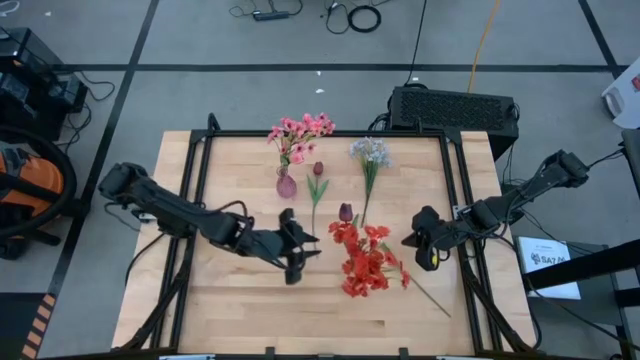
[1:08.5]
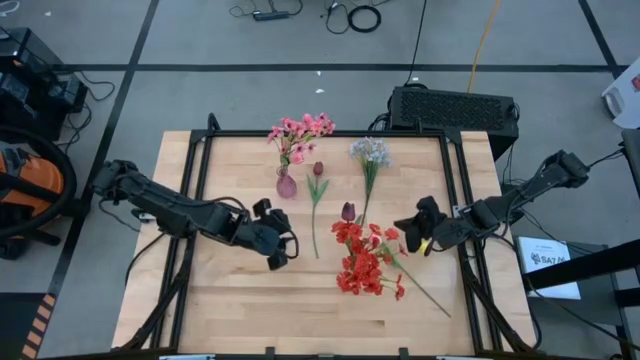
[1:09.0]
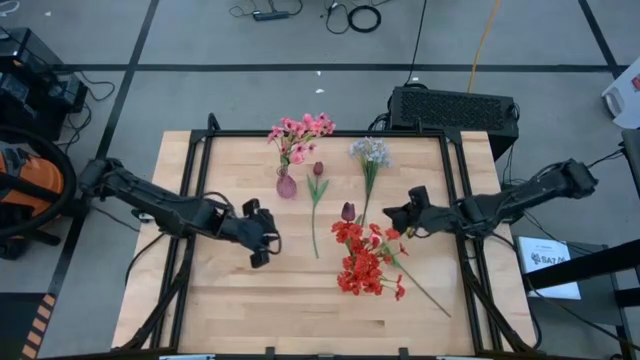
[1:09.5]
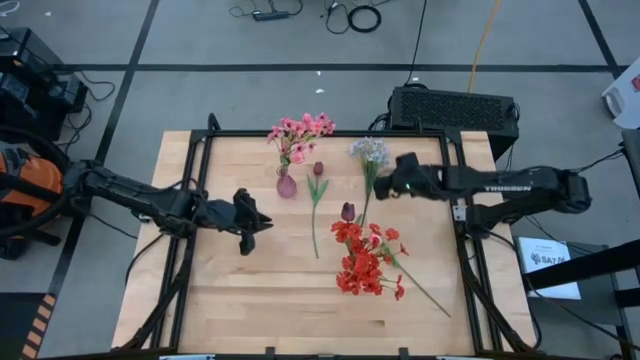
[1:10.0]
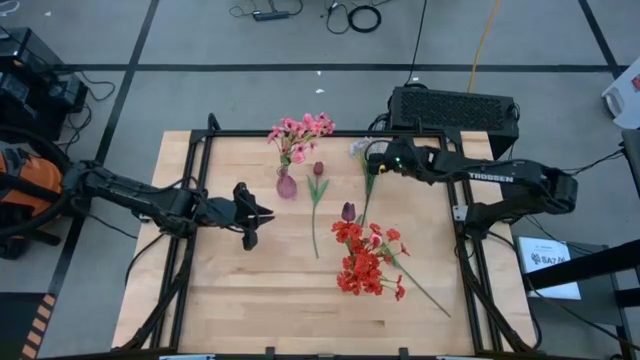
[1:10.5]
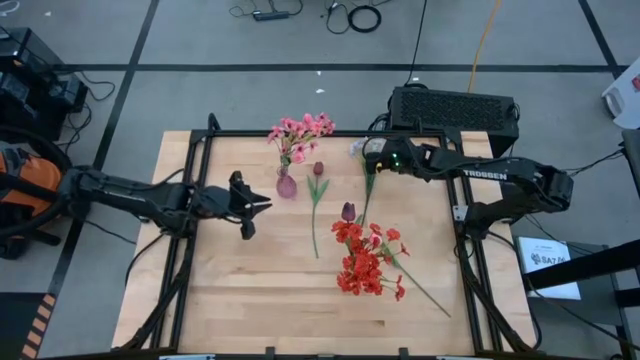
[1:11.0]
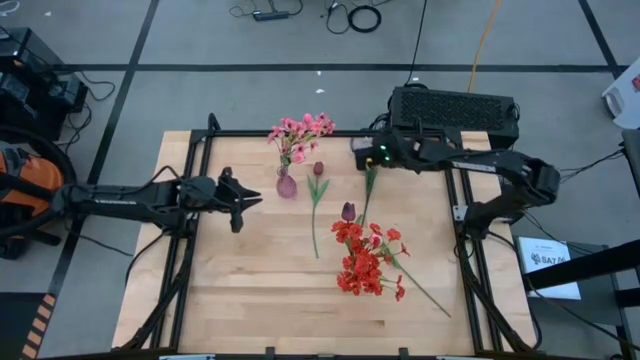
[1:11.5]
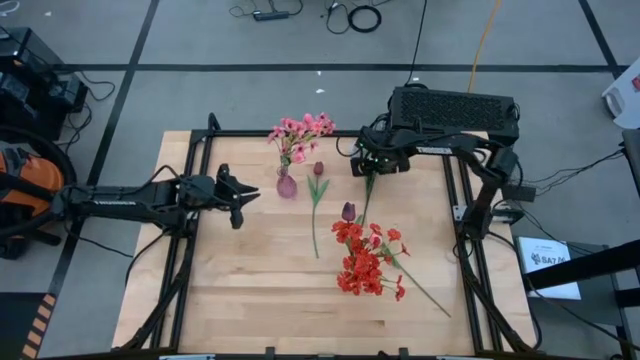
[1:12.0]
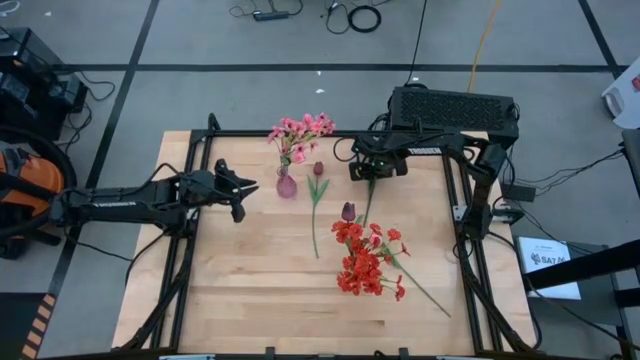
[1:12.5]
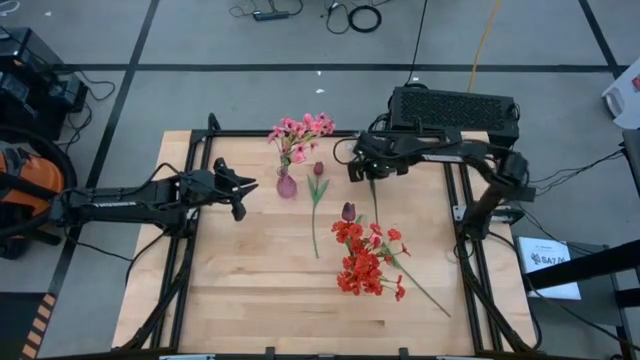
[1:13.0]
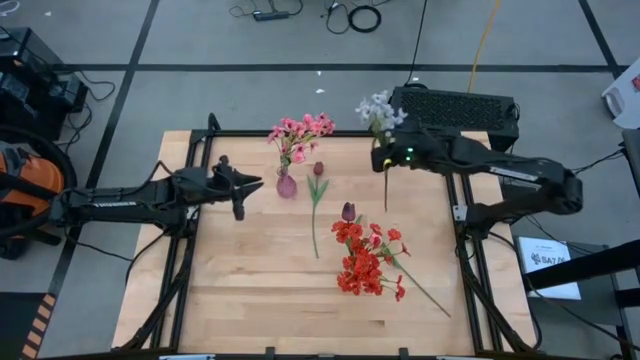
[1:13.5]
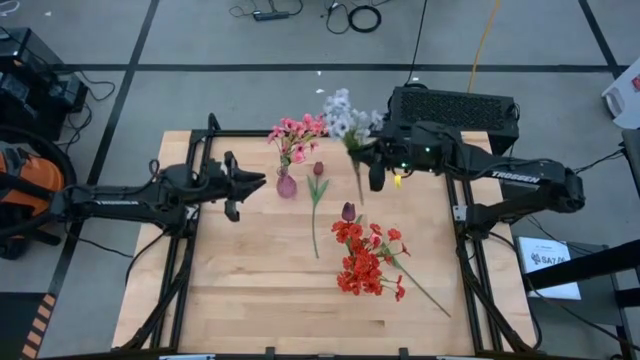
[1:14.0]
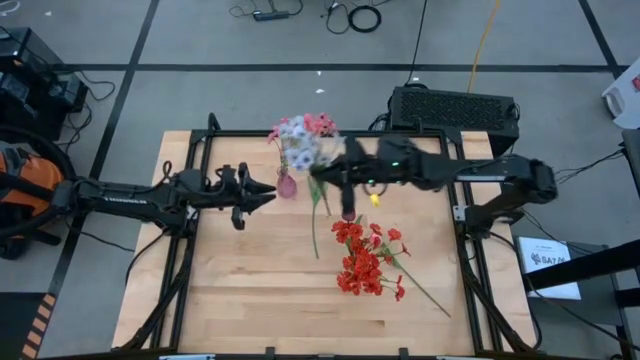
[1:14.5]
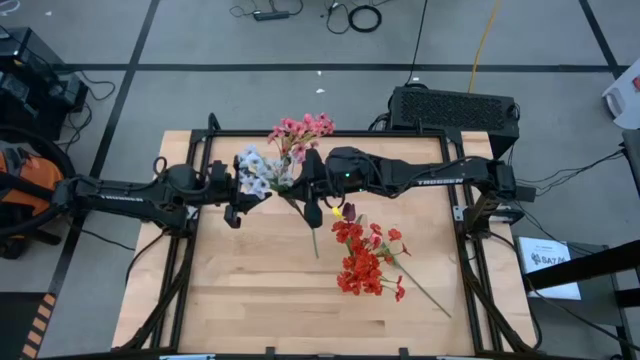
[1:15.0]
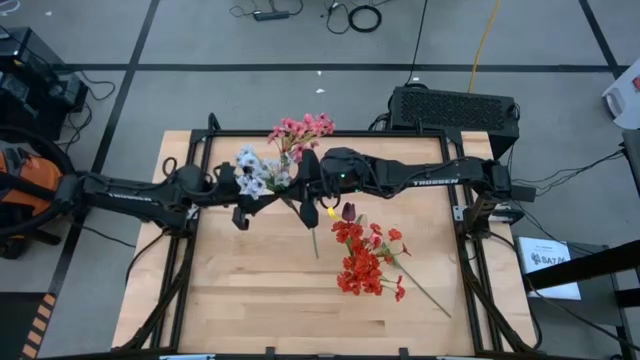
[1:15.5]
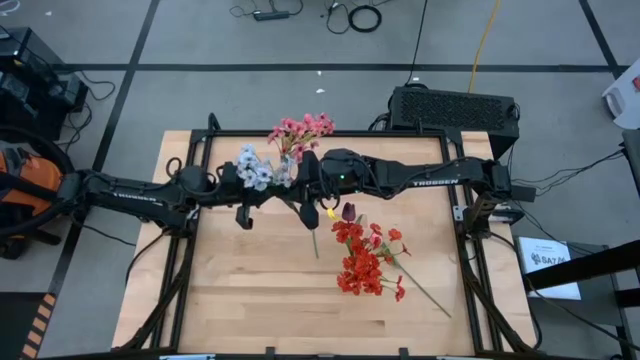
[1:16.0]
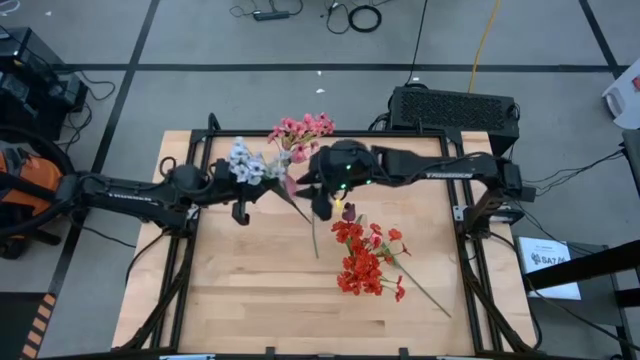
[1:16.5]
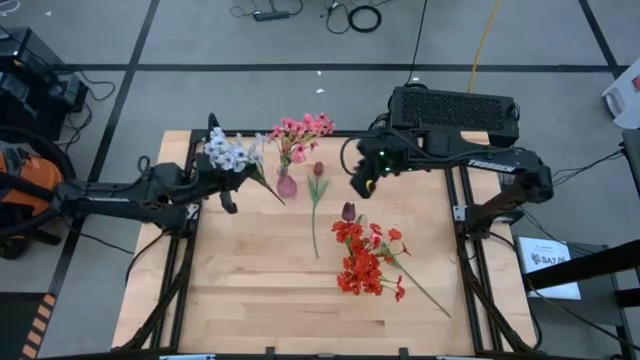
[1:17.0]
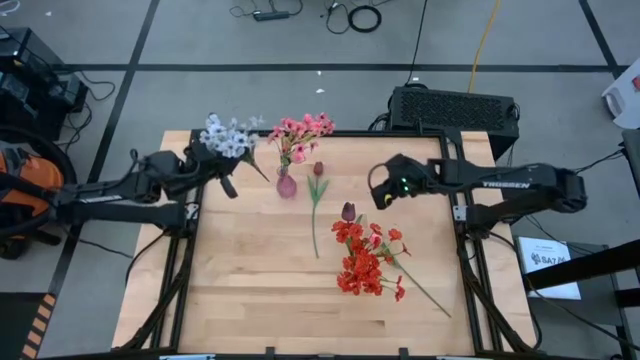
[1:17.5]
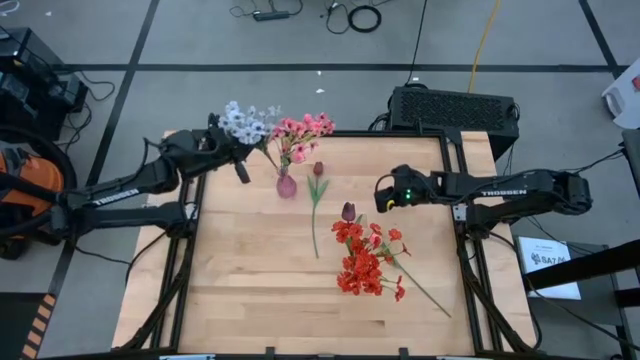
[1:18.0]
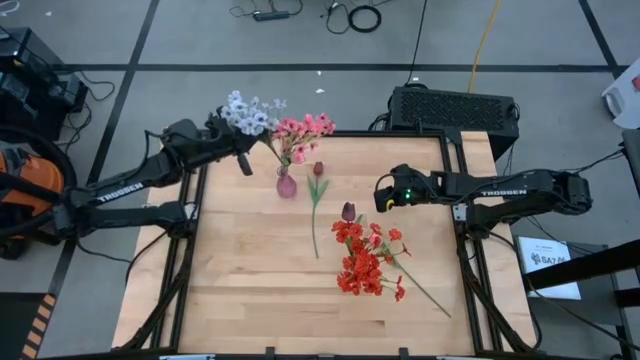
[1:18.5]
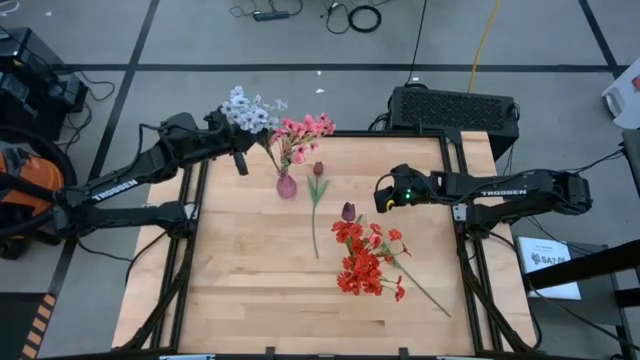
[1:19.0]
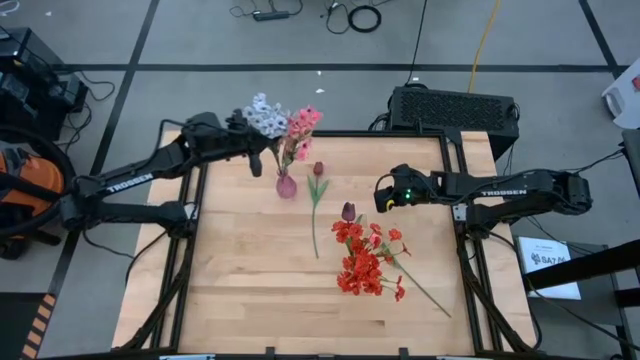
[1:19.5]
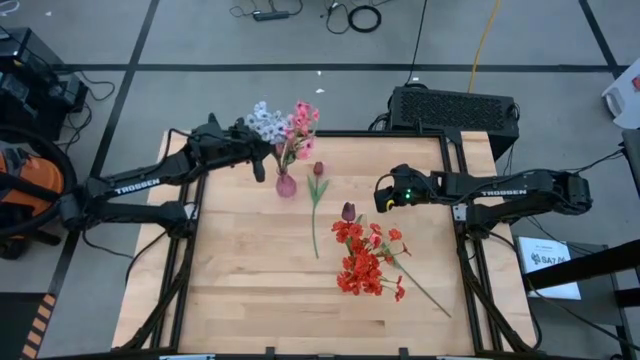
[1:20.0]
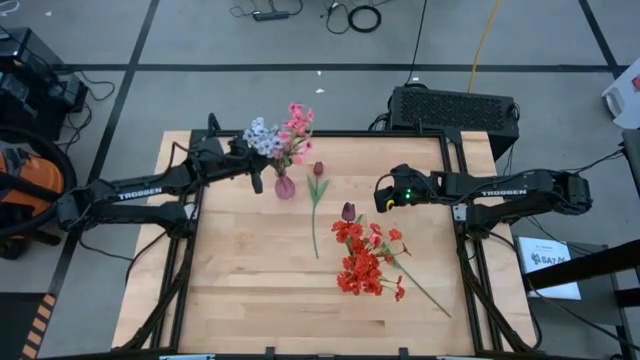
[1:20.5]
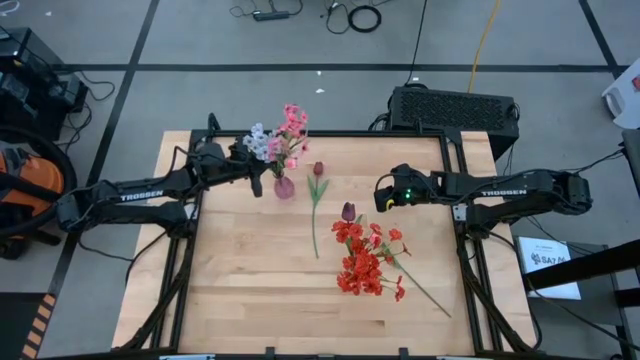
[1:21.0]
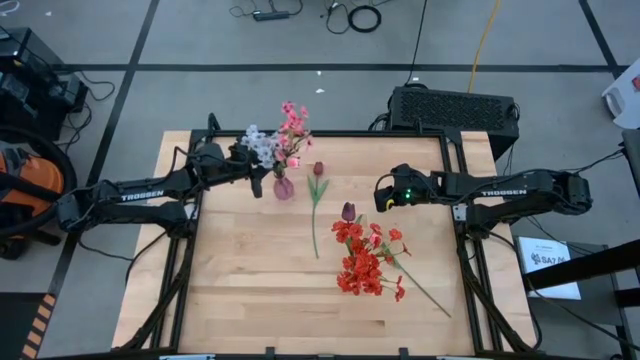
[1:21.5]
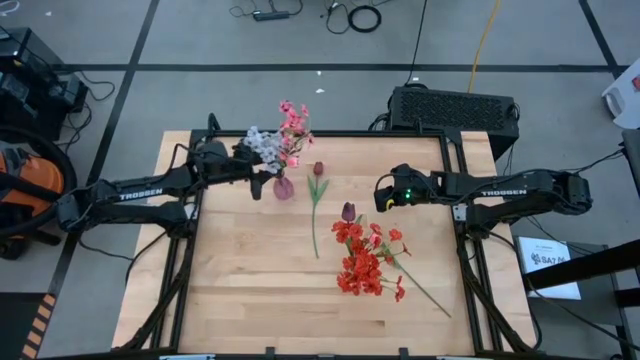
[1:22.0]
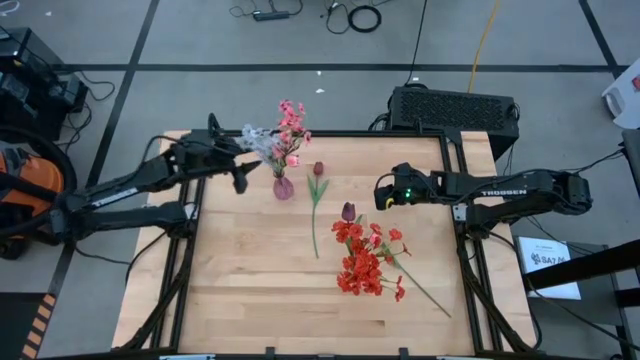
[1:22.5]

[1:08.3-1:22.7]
Task: Sort flowers into vase by color
Put the white flowers into the light violet flower vase

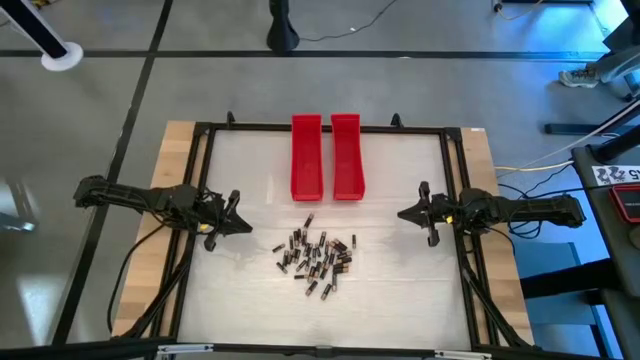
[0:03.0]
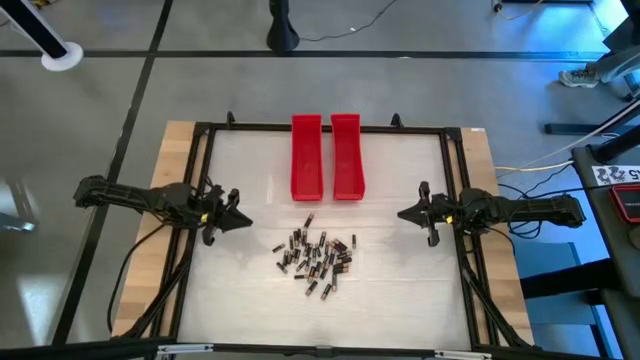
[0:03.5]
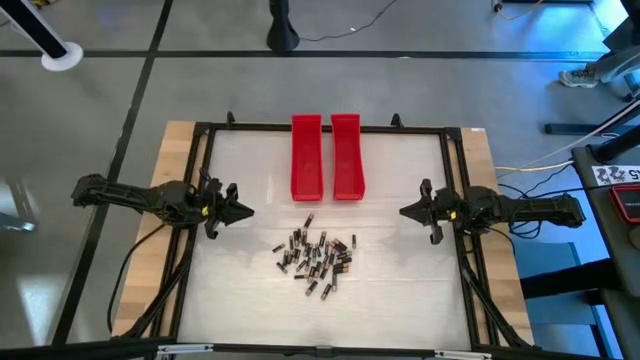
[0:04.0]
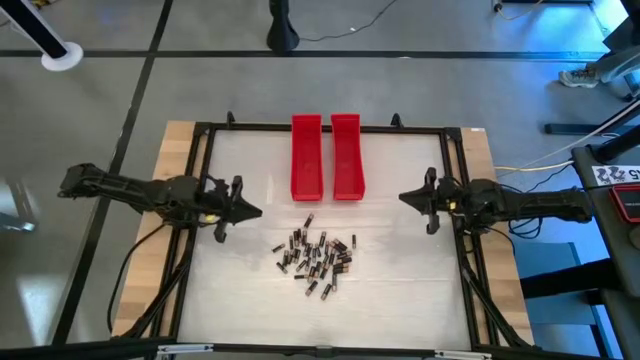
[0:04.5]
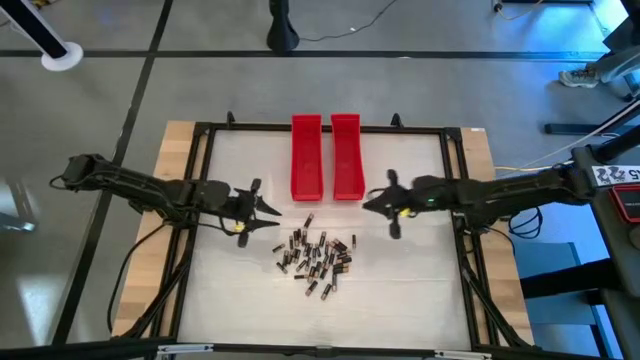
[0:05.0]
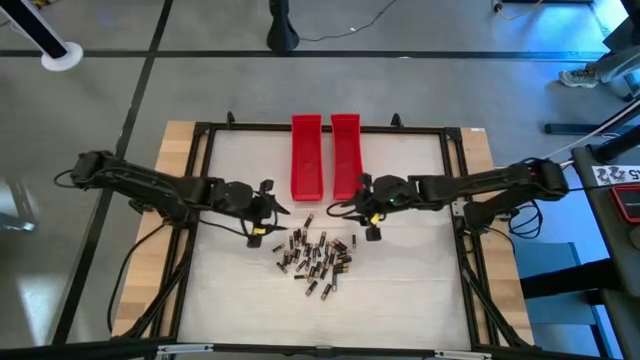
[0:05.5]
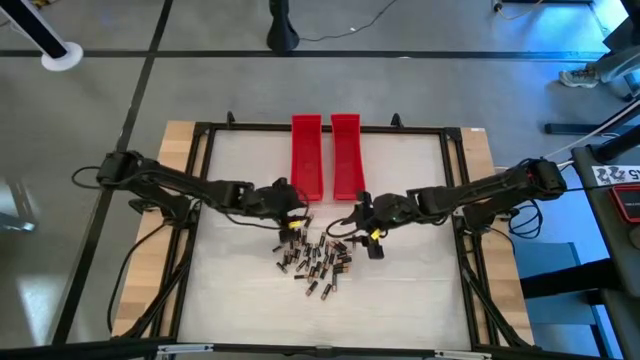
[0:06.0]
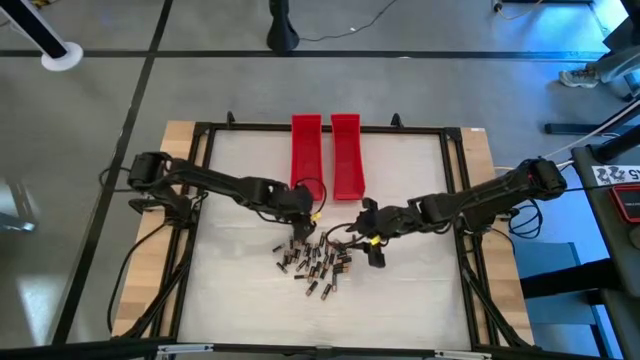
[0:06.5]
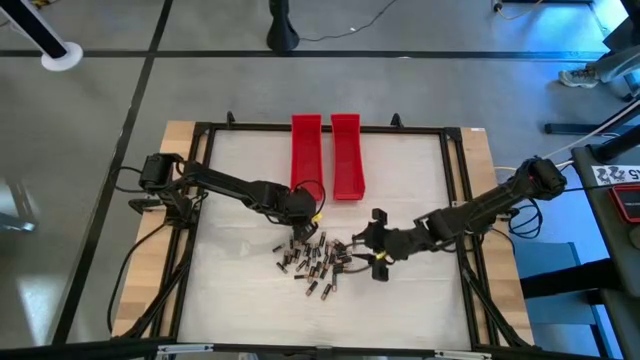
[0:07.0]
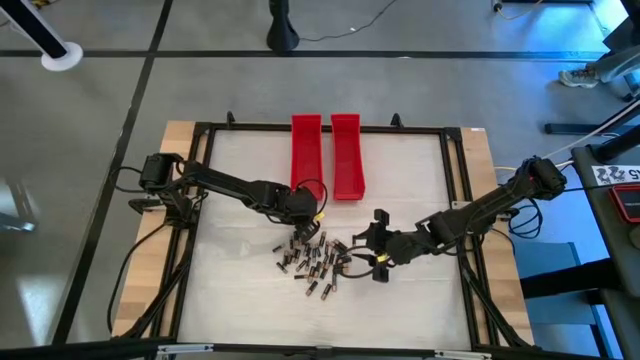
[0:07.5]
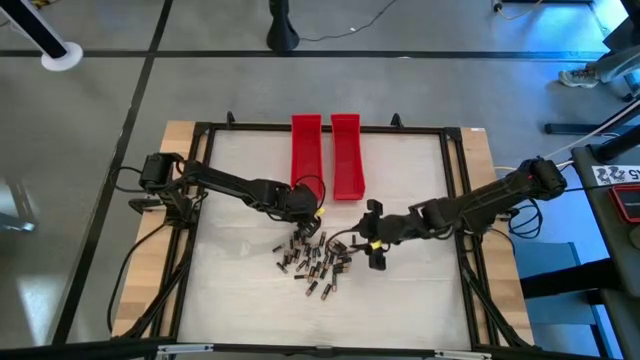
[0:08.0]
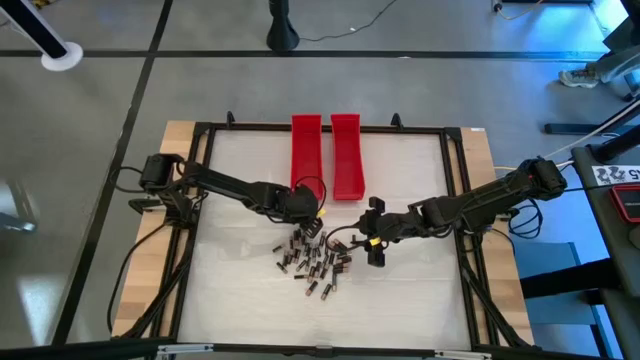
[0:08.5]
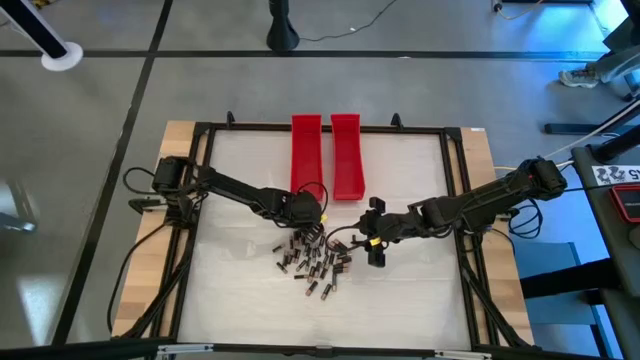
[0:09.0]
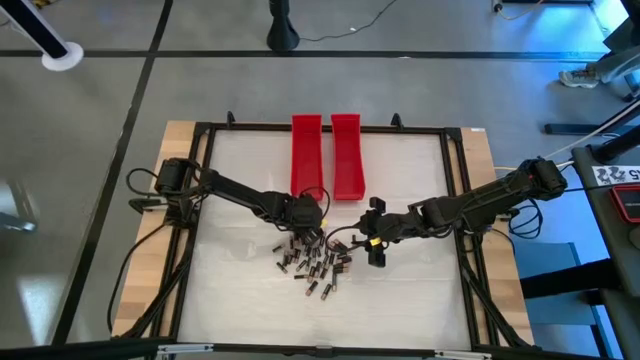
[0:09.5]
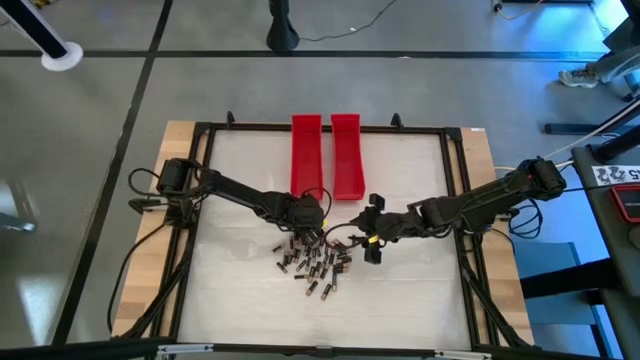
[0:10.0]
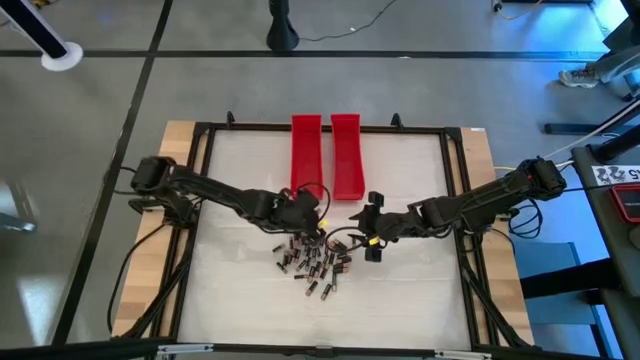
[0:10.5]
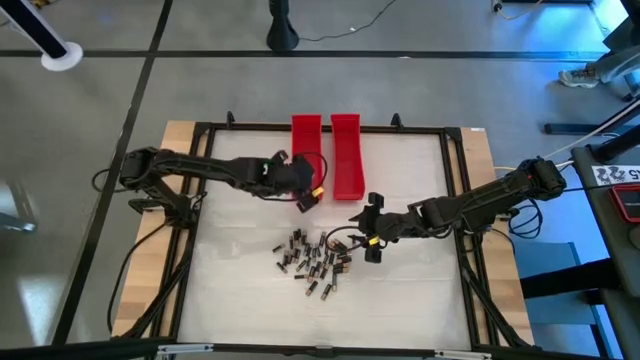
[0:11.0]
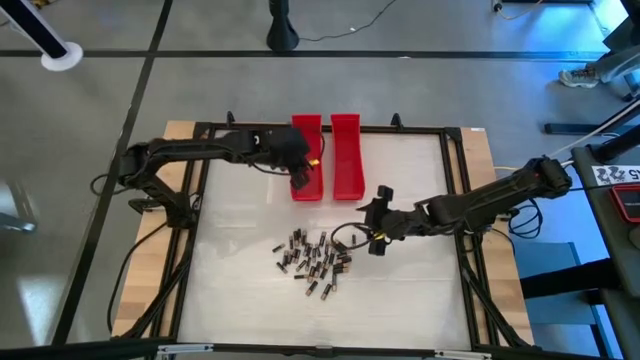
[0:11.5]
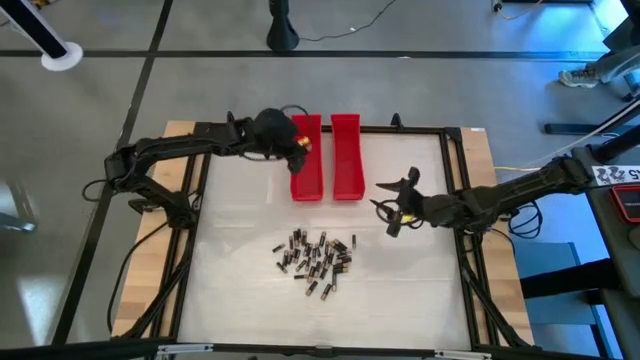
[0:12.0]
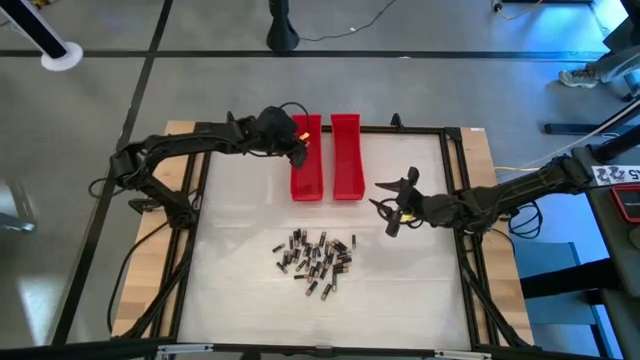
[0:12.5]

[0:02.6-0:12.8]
Task: Sort batteries
Put the large black battery into the left red bin
